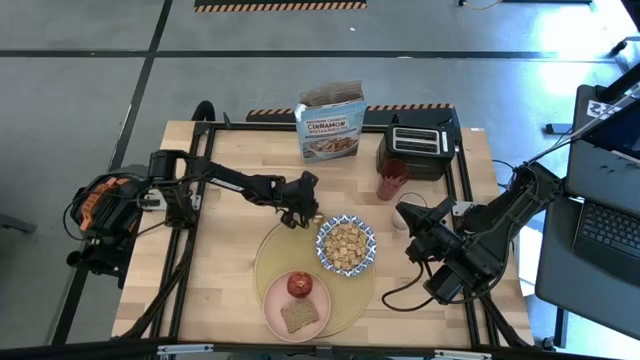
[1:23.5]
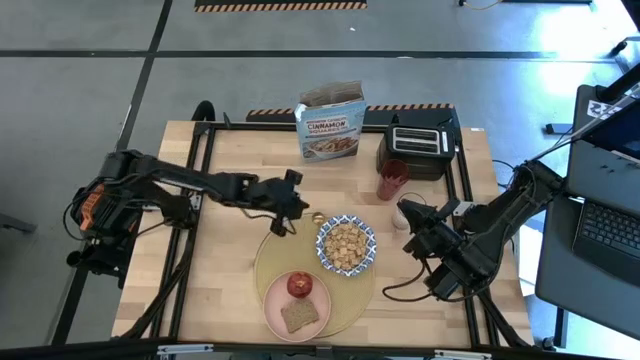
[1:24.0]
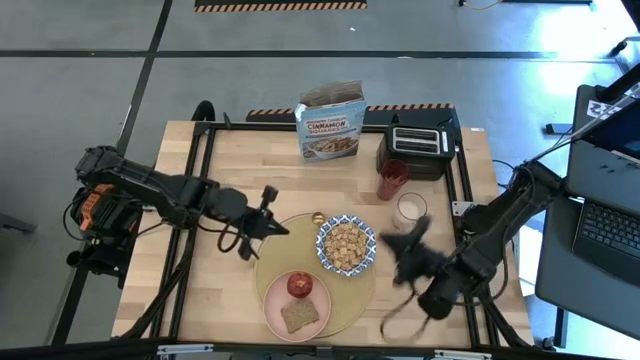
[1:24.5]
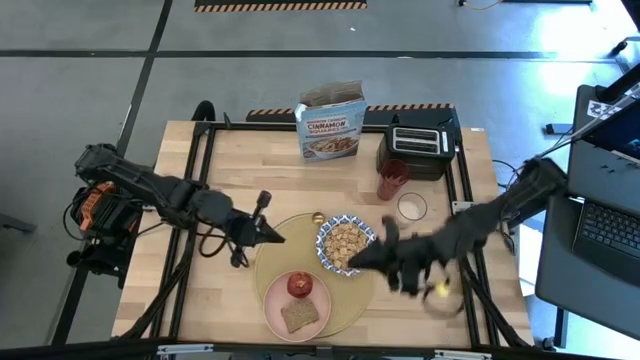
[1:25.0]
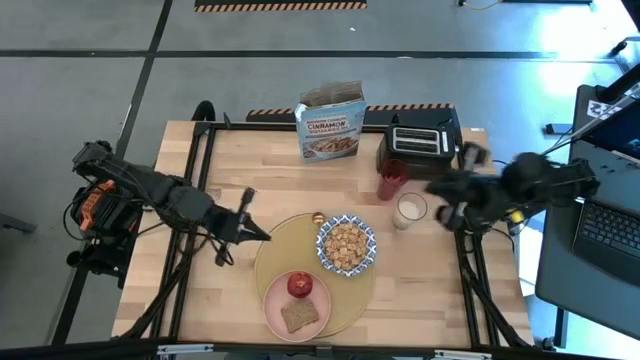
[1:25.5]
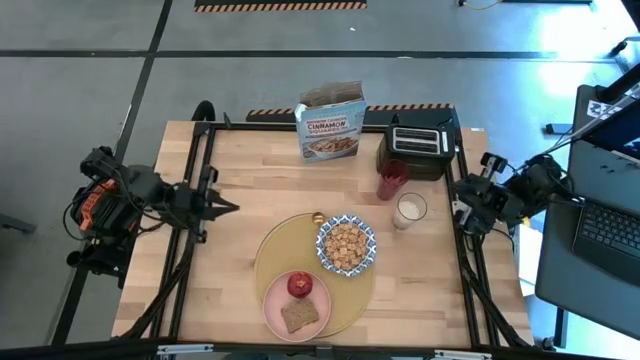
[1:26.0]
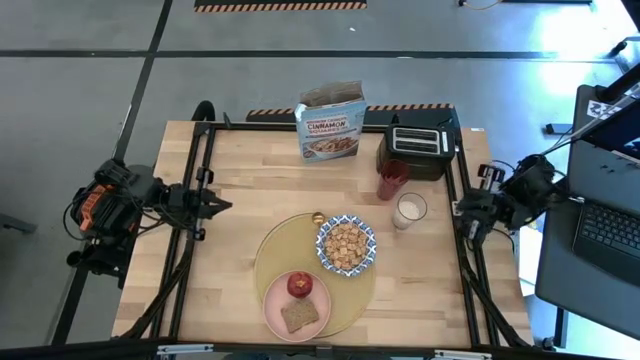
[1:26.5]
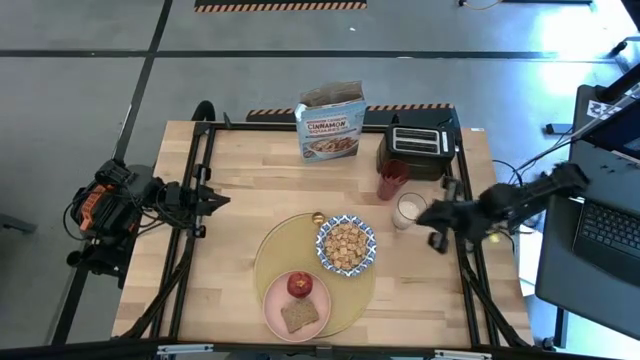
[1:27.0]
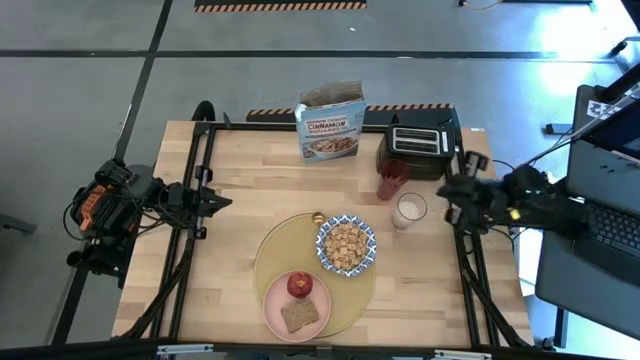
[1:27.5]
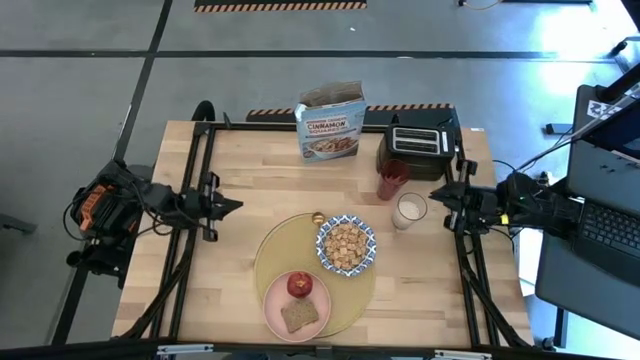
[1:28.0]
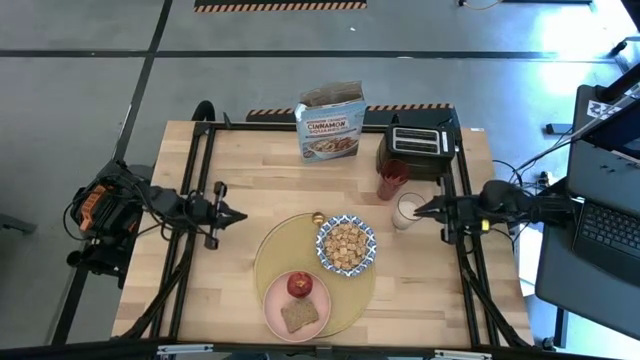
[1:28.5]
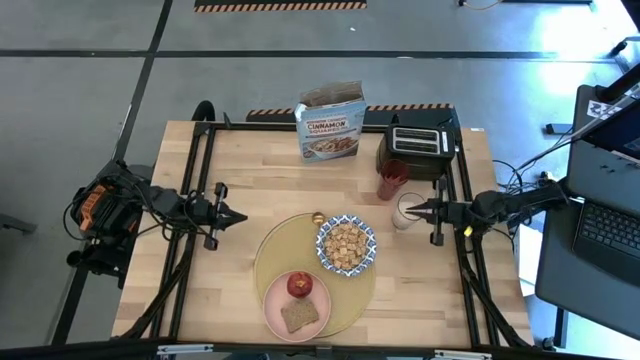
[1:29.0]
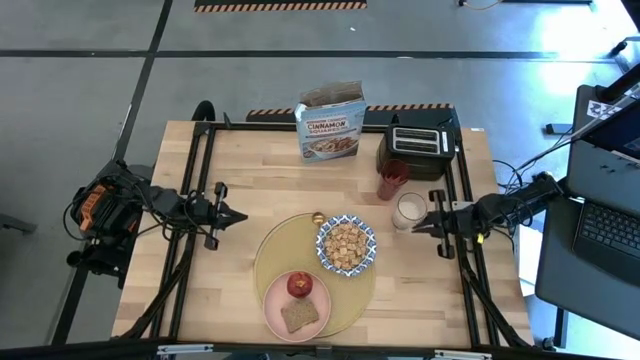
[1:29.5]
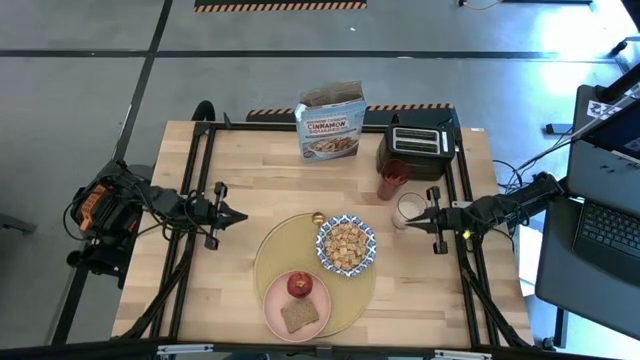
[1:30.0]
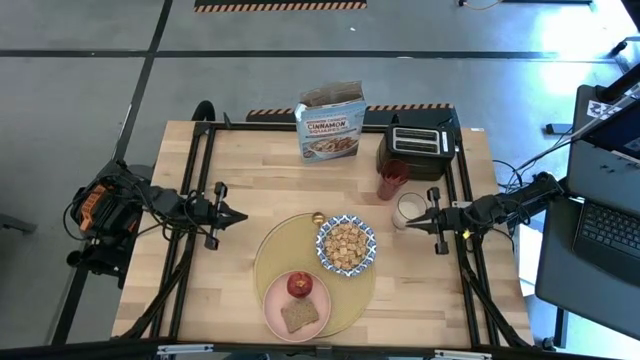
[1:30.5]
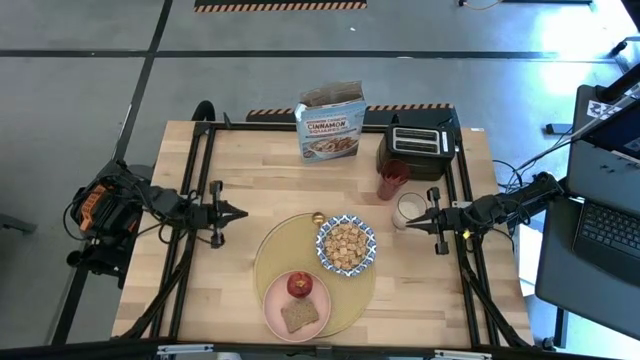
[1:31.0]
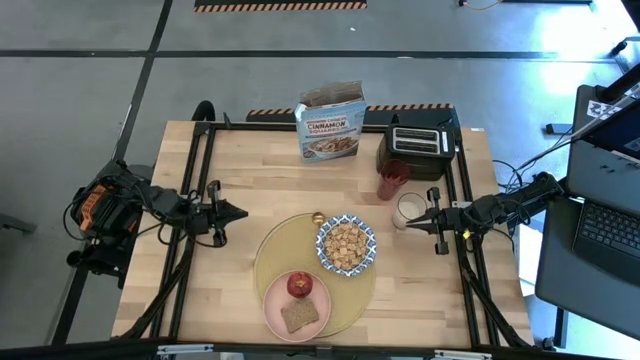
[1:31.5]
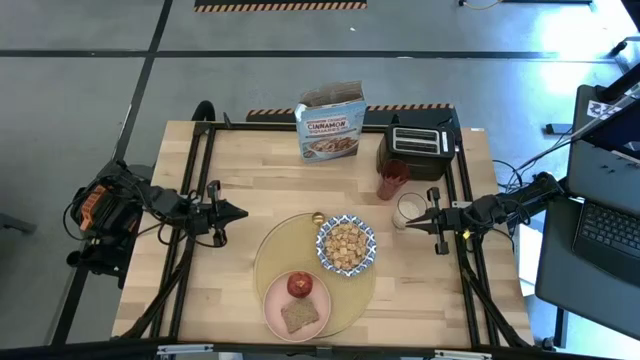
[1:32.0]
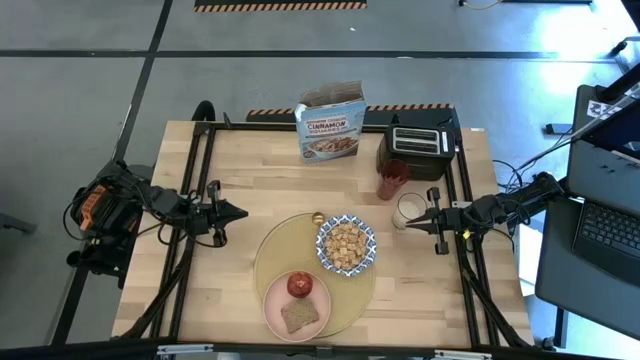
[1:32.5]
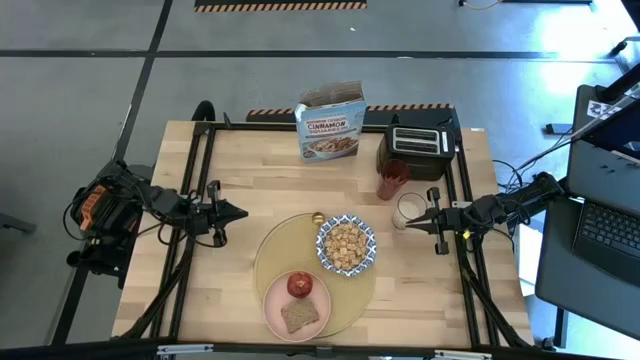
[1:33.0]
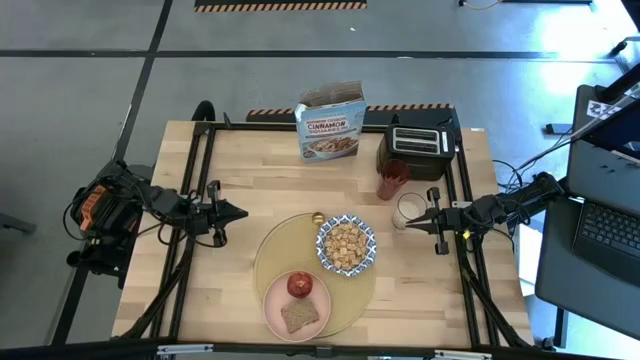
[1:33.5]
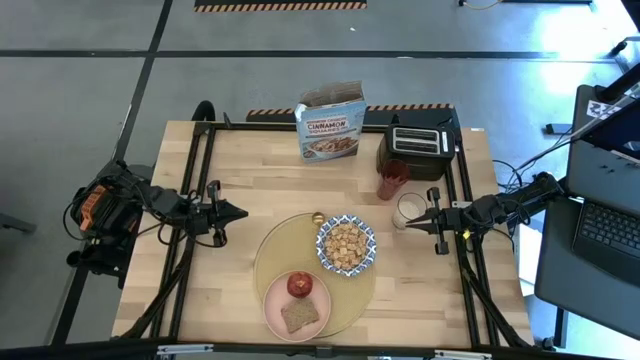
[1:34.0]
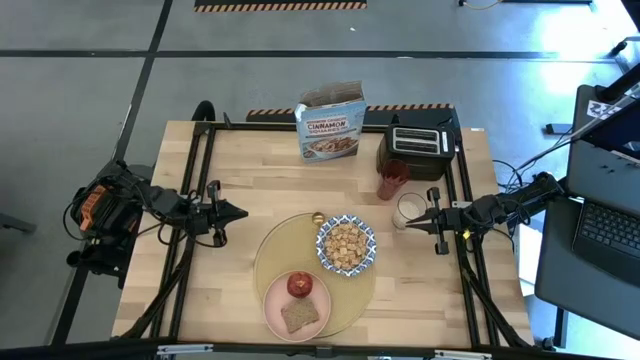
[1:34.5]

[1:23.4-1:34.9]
Task: Arrange a breakfast setting
Return to Home Position

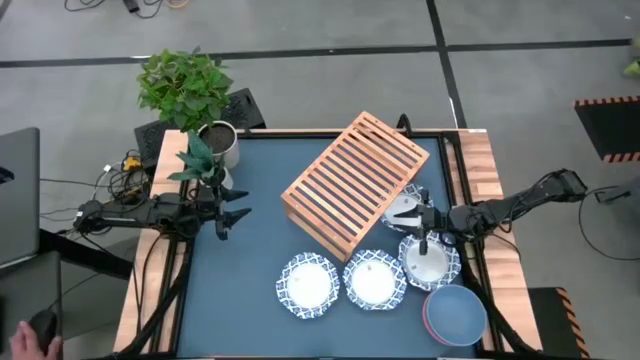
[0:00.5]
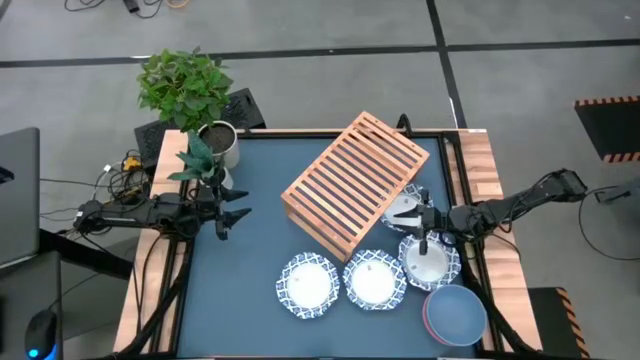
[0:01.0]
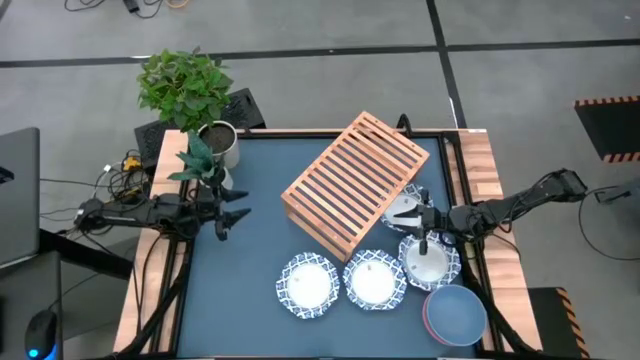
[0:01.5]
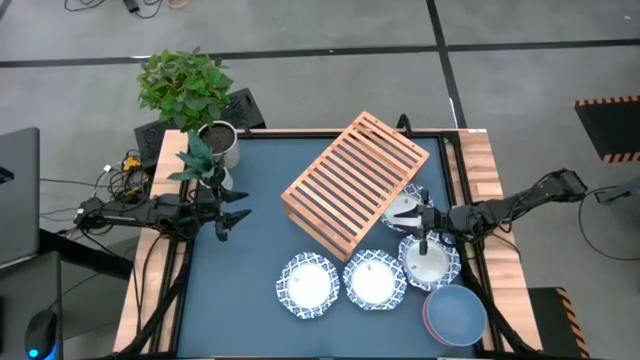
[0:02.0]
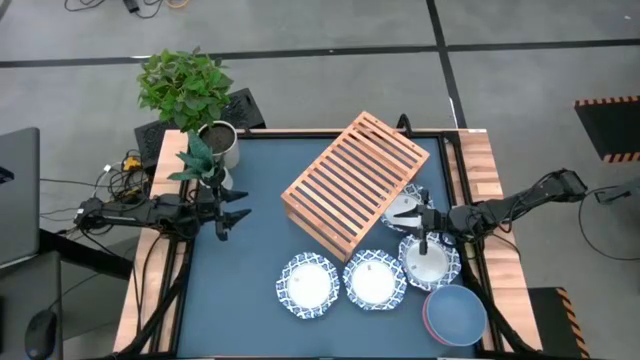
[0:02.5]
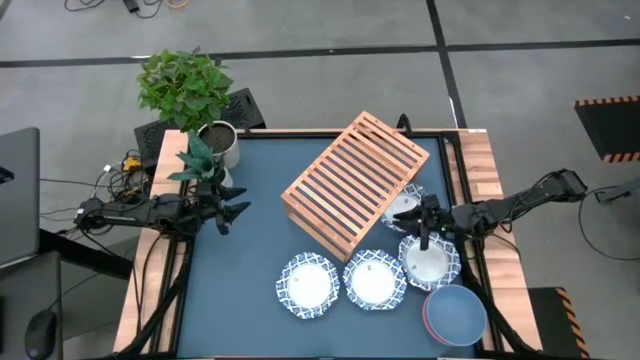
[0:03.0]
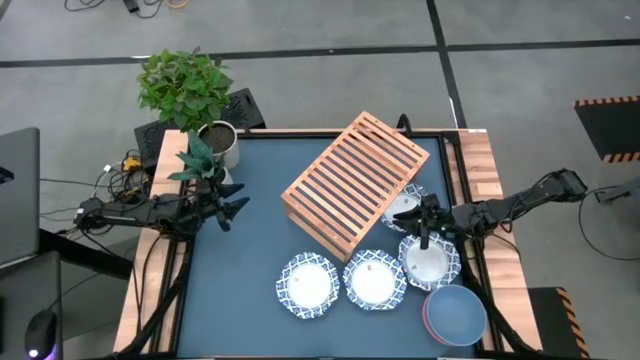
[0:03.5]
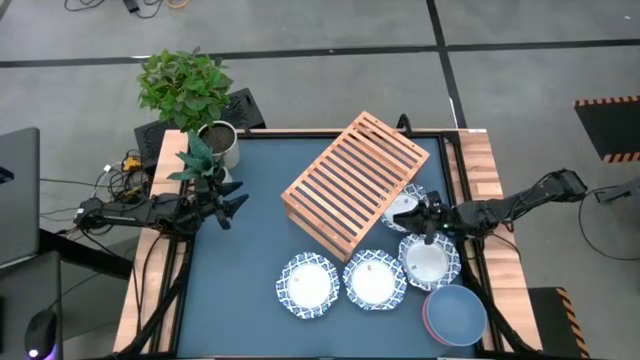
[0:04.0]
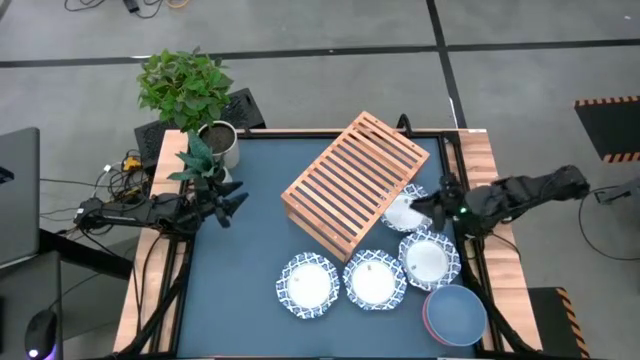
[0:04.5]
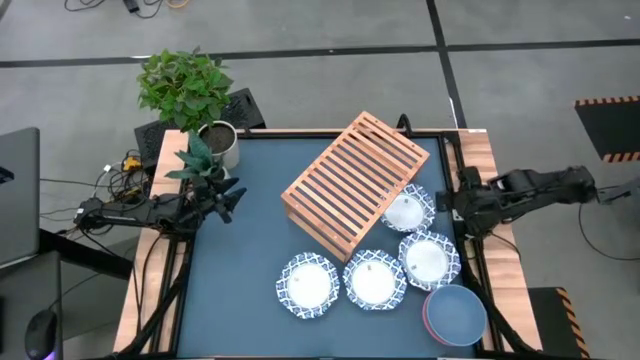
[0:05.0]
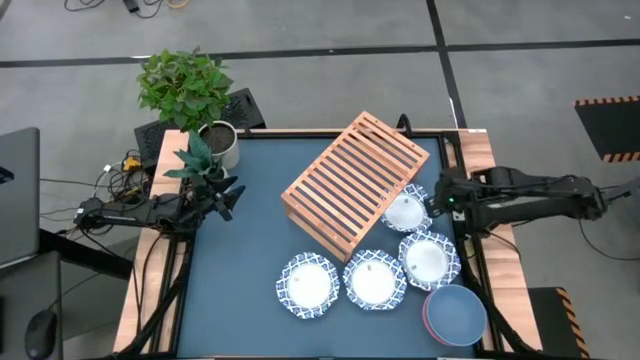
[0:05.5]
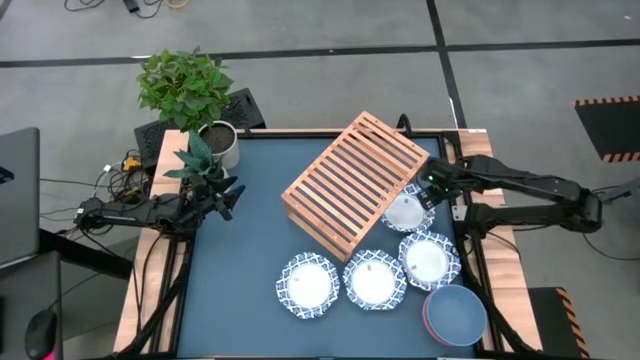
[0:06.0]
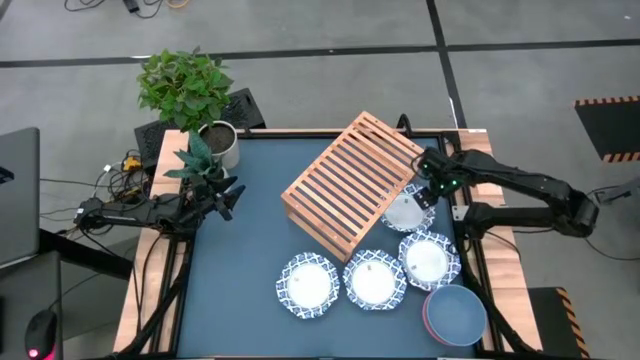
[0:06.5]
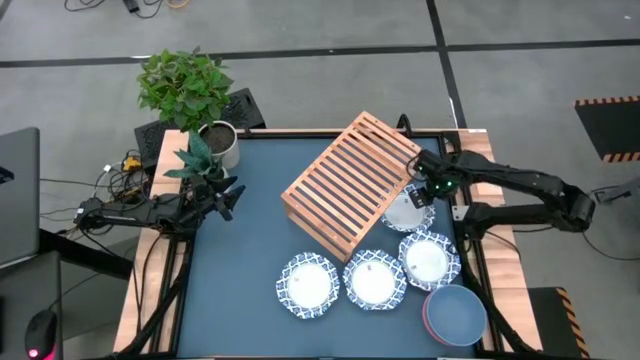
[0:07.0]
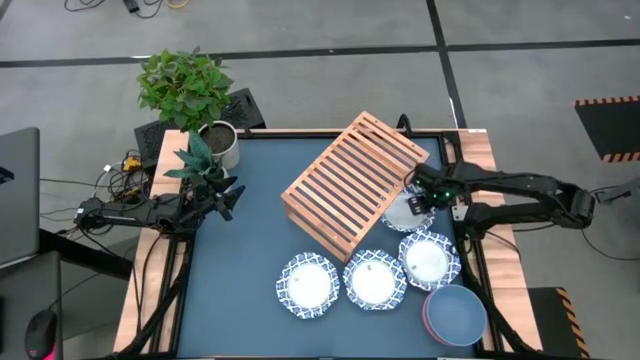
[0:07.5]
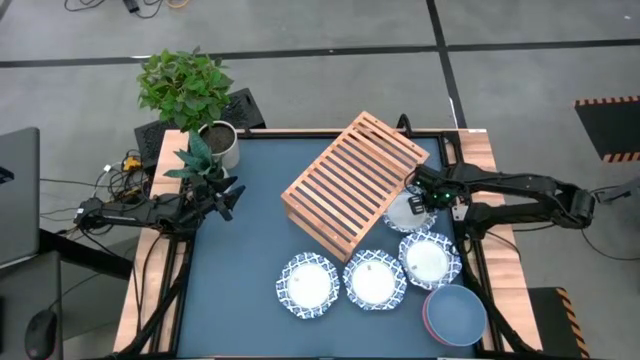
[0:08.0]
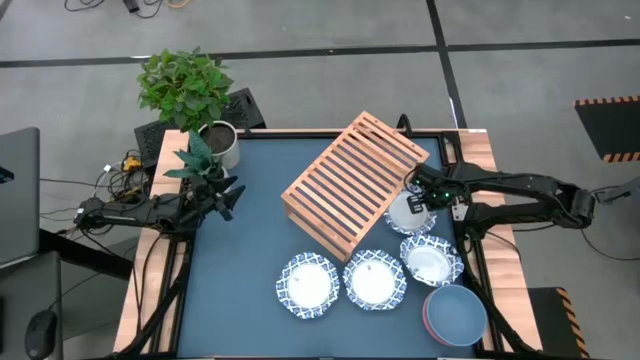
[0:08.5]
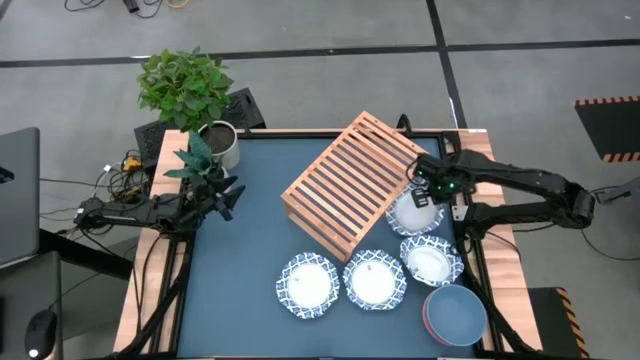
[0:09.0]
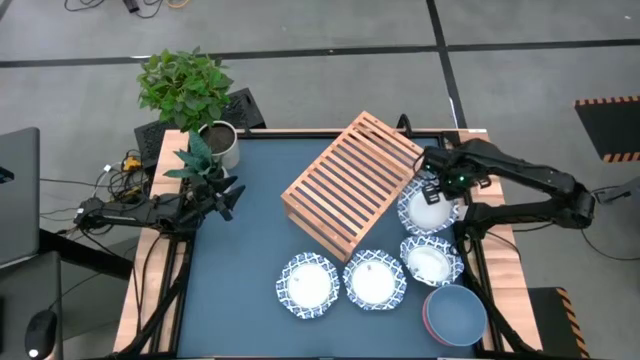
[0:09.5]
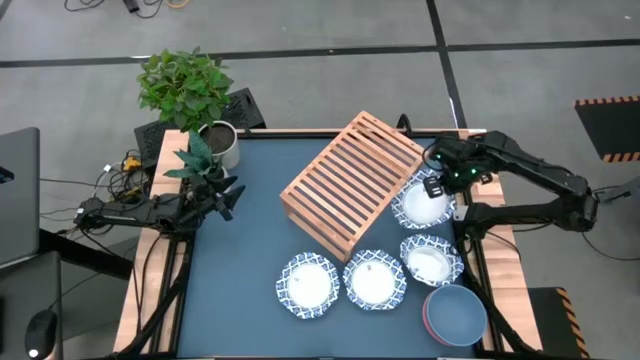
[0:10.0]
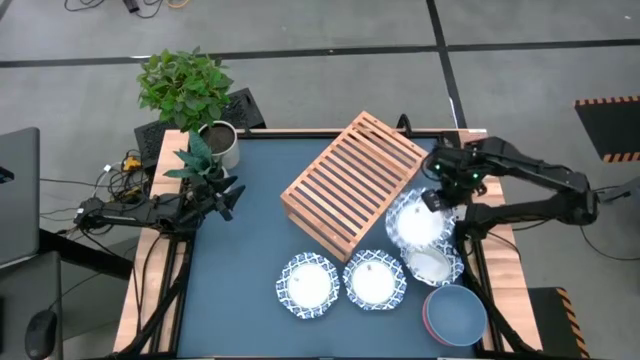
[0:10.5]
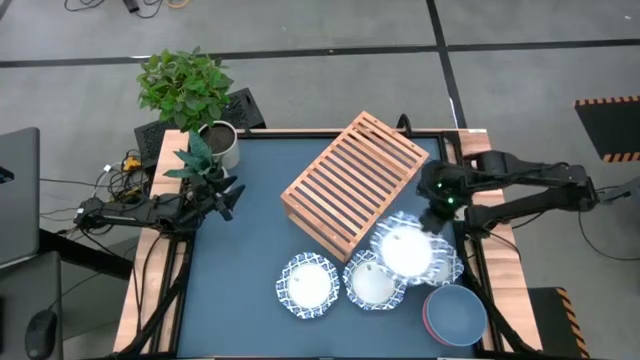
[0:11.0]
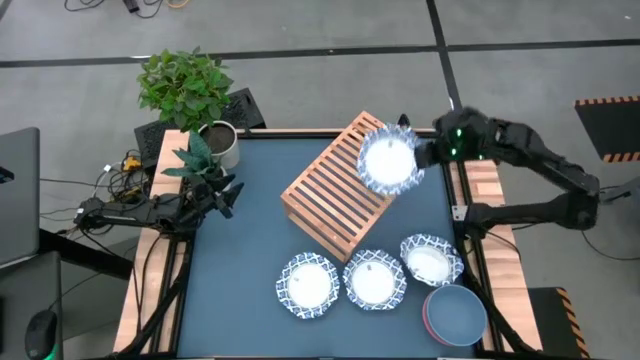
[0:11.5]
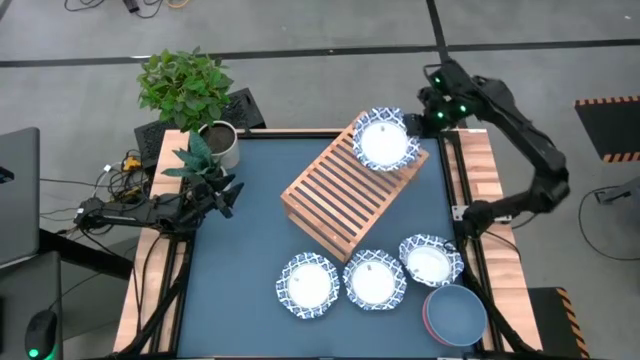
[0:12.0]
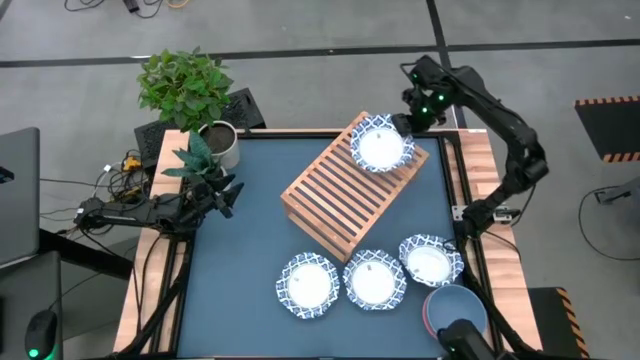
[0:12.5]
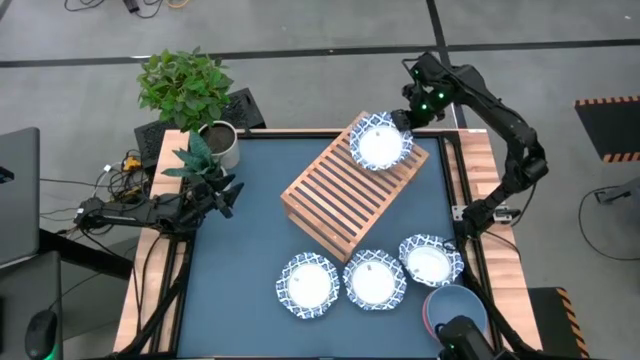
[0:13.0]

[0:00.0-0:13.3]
Task: Place and stack bowls onto a shelf
Put the top white and blue patterned bowl on the shelf
